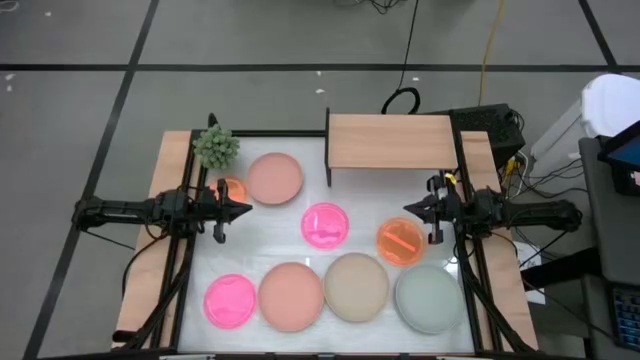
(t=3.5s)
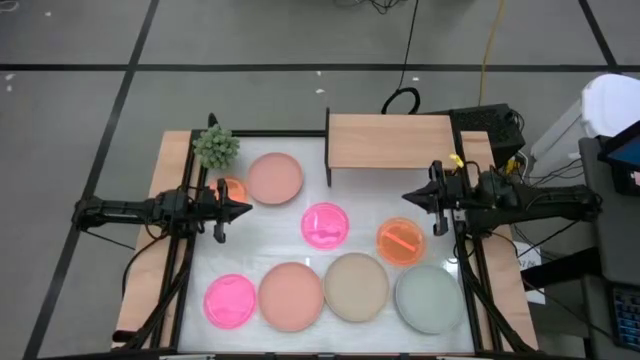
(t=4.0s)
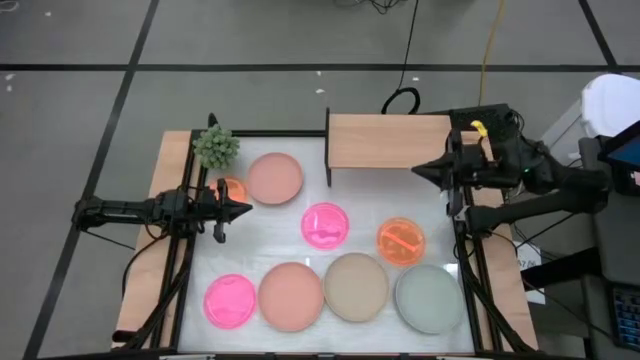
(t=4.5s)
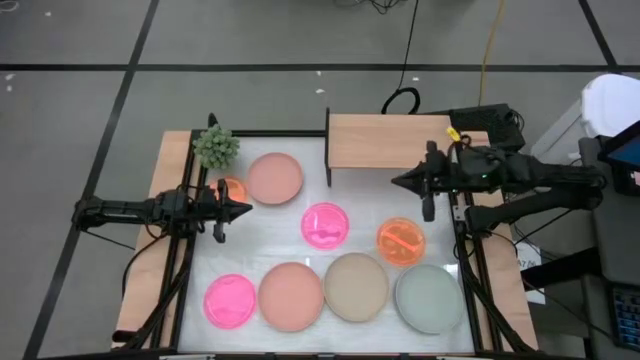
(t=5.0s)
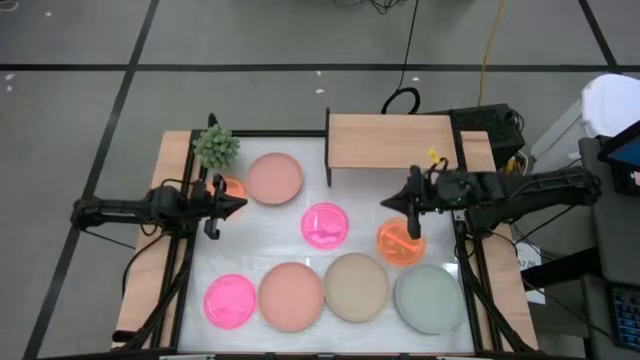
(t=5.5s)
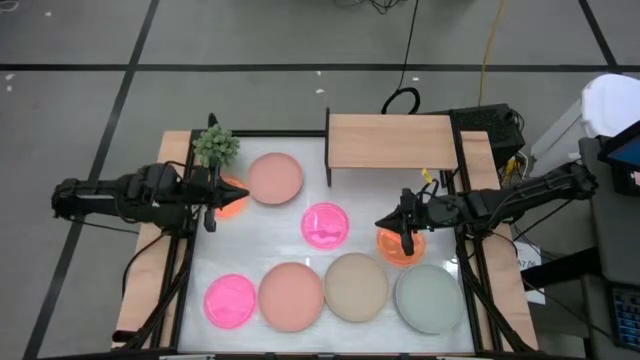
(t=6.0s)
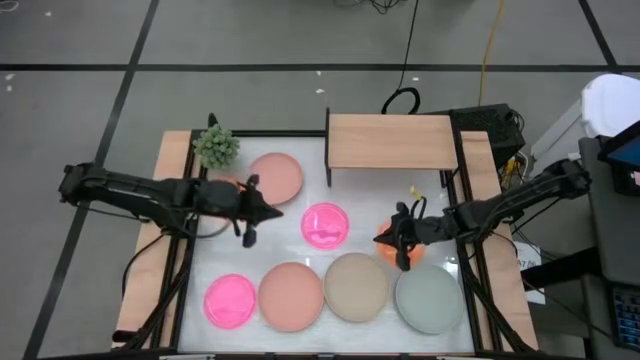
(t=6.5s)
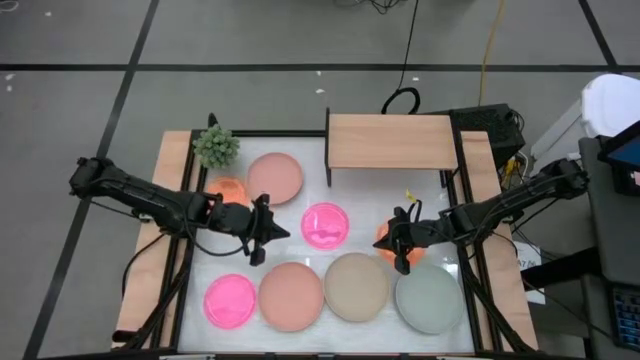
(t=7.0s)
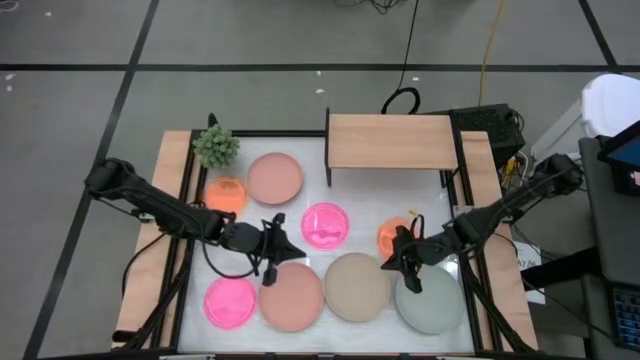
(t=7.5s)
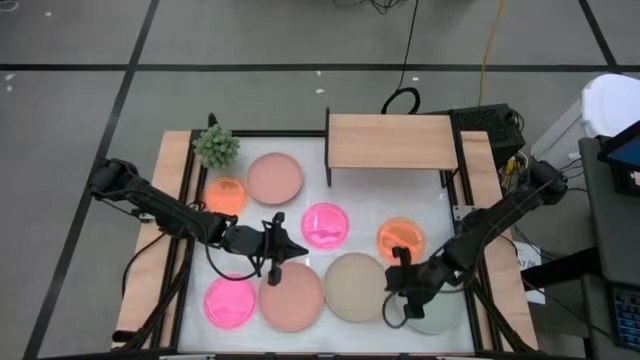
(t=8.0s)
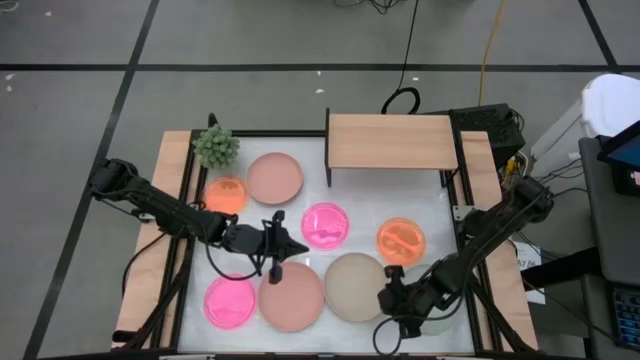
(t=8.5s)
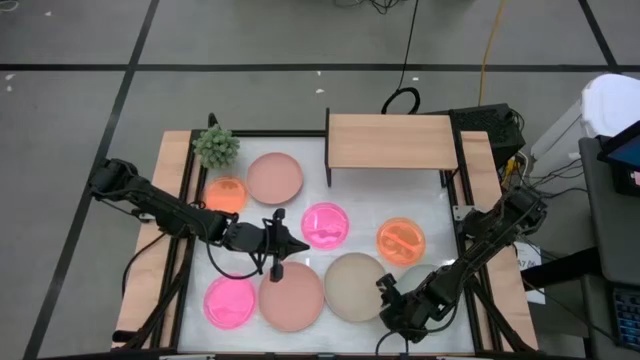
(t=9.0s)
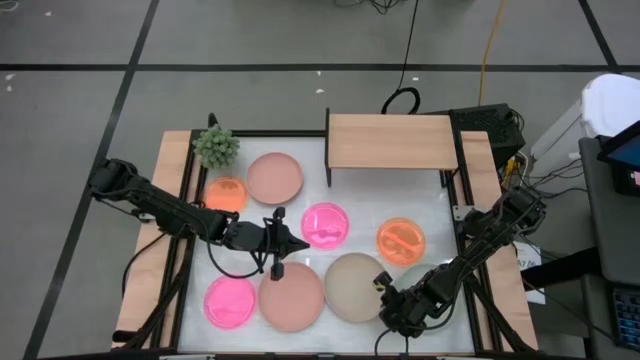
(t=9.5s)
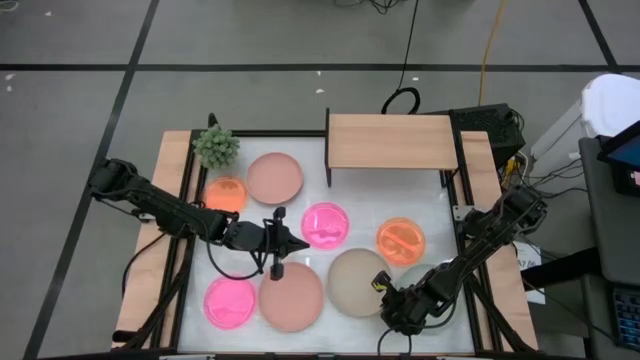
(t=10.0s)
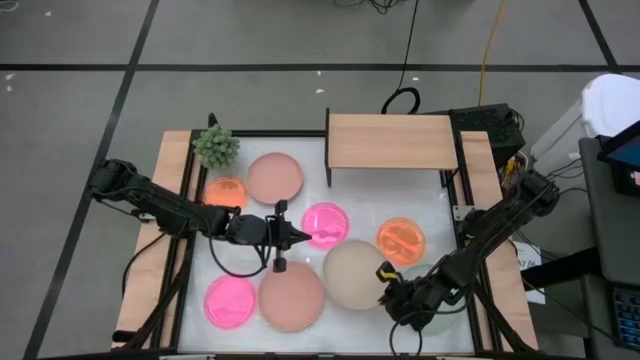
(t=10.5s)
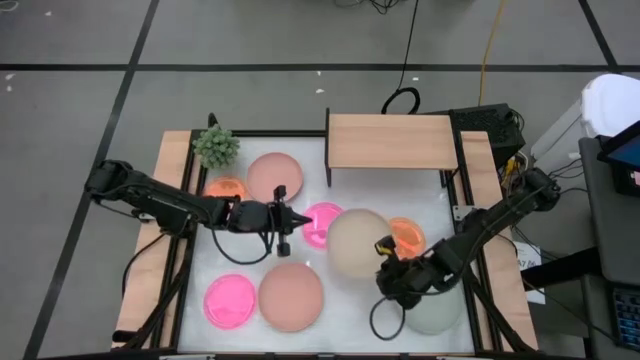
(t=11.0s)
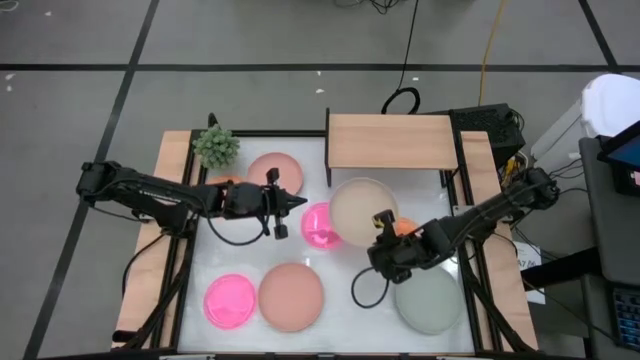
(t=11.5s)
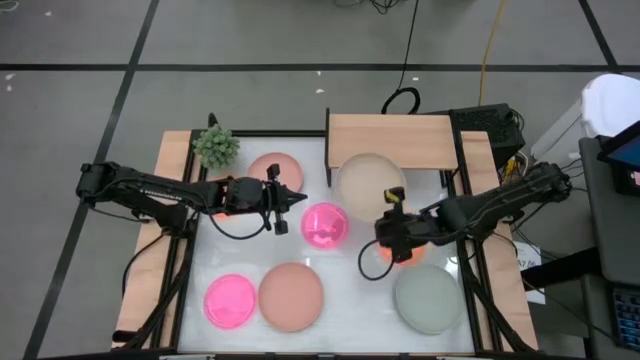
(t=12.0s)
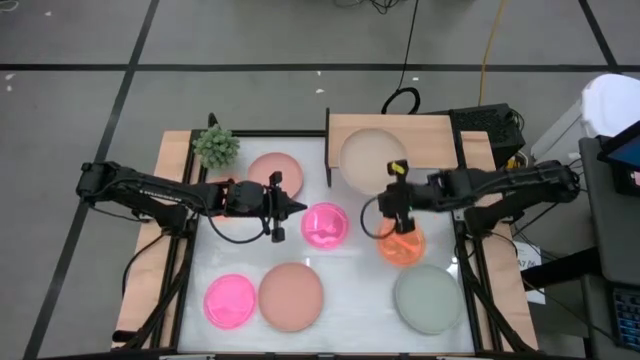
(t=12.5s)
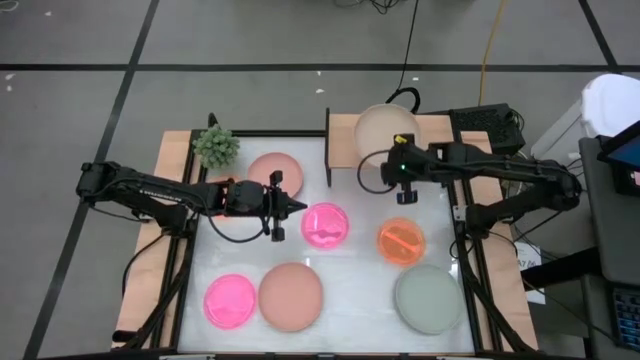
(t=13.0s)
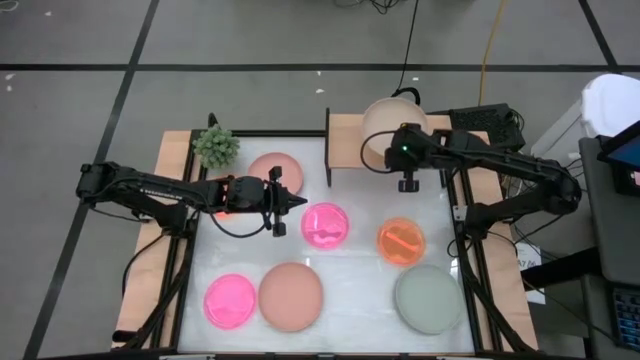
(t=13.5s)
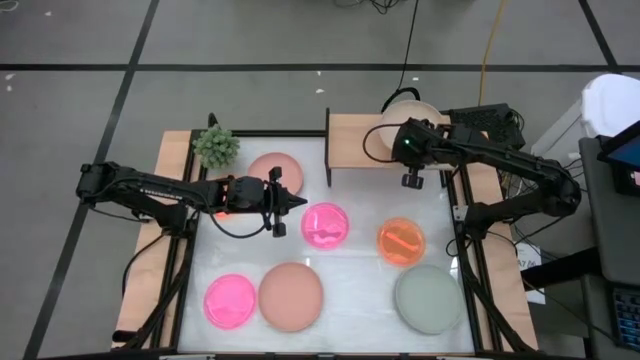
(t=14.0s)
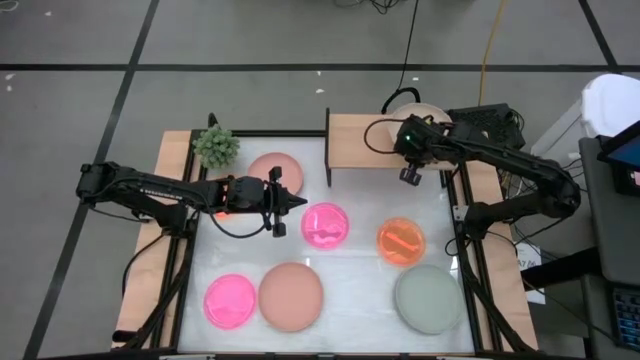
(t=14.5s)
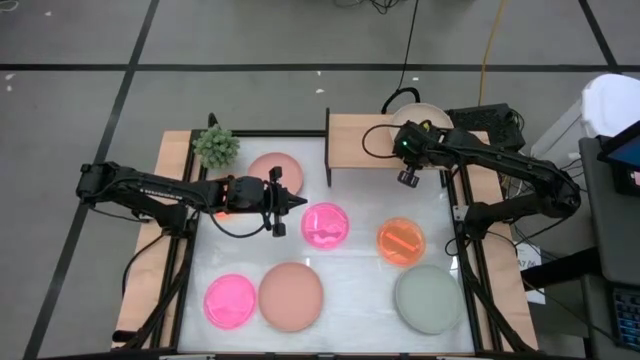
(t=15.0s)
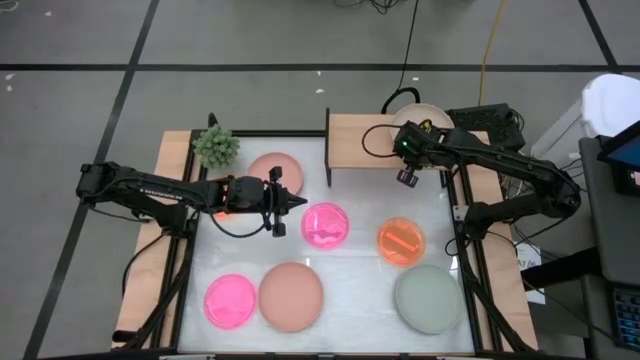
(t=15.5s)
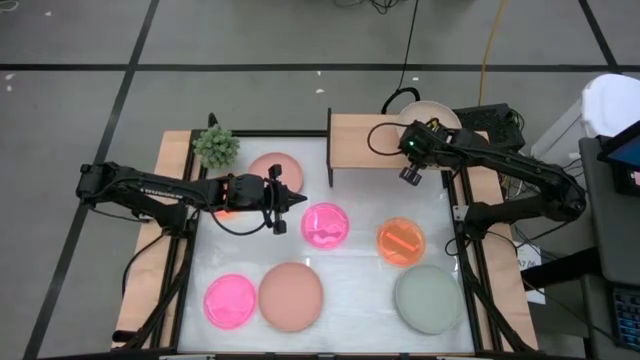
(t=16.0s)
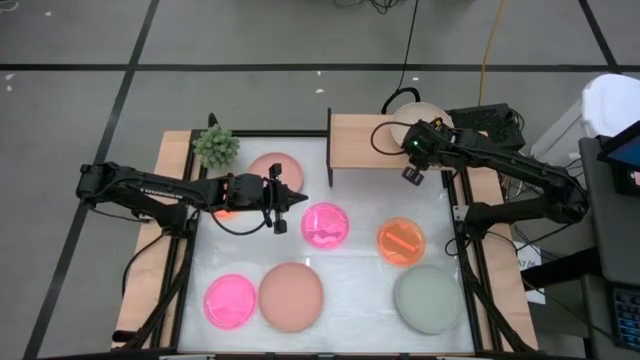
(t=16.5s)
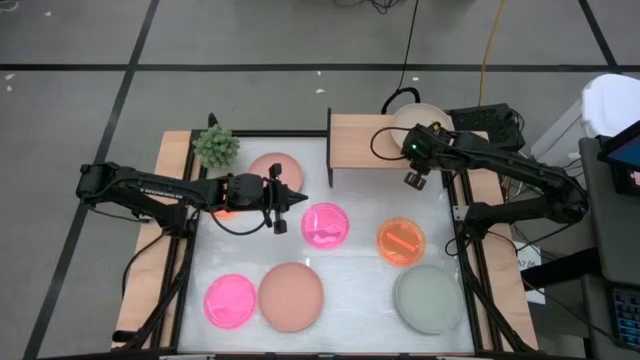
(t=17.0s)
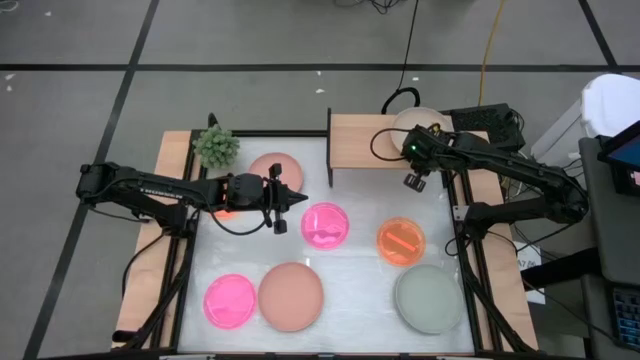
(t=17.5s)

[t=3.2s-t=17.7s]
Task: Place and stack plates onto a shelf
Put the brown plate on the shelf

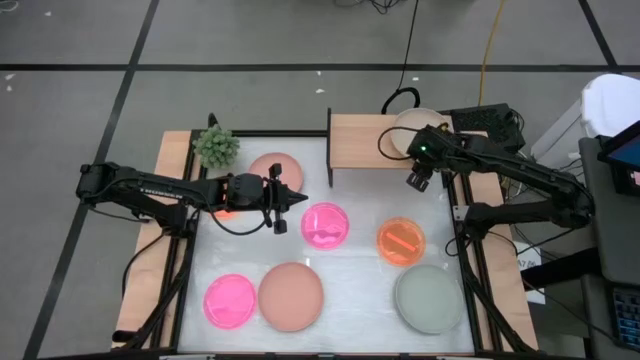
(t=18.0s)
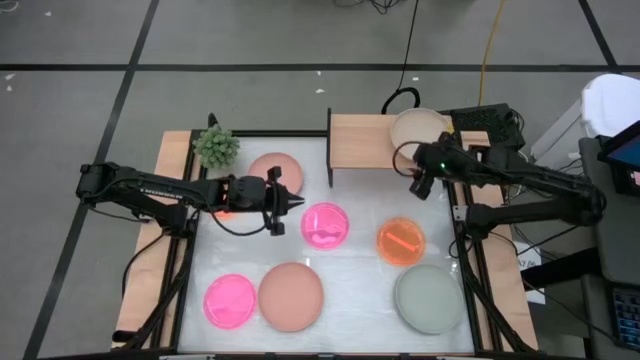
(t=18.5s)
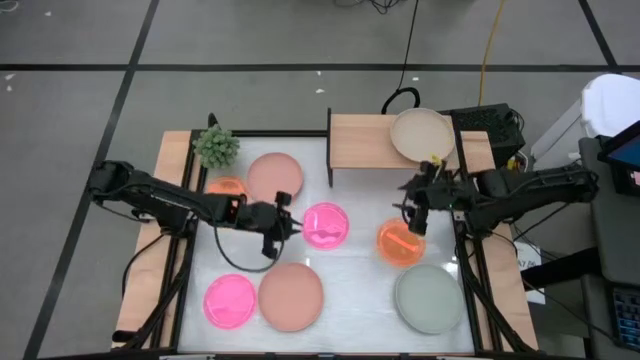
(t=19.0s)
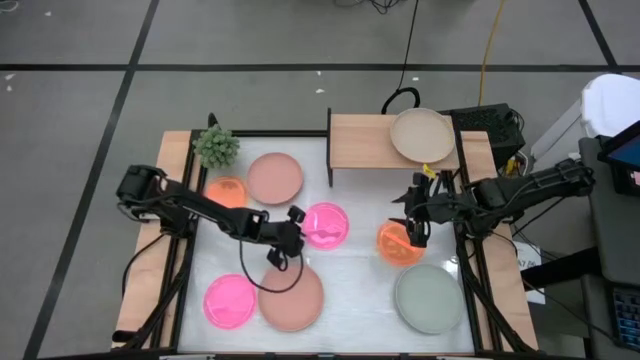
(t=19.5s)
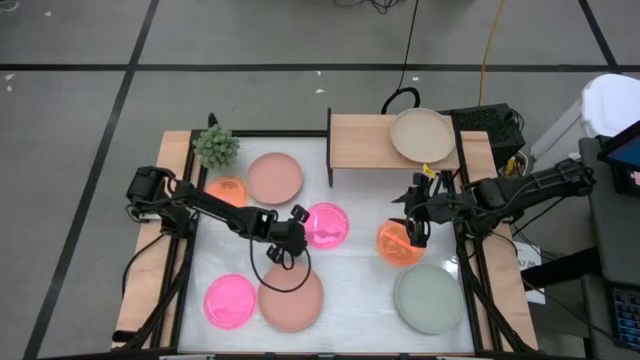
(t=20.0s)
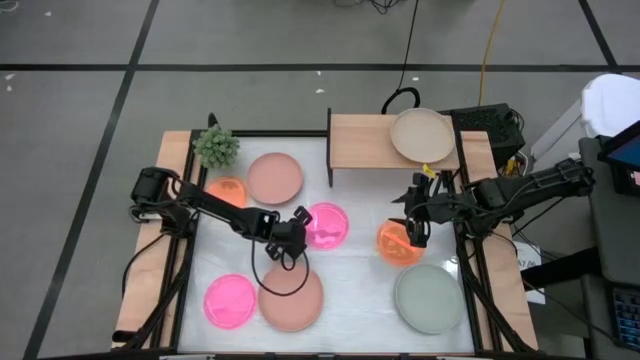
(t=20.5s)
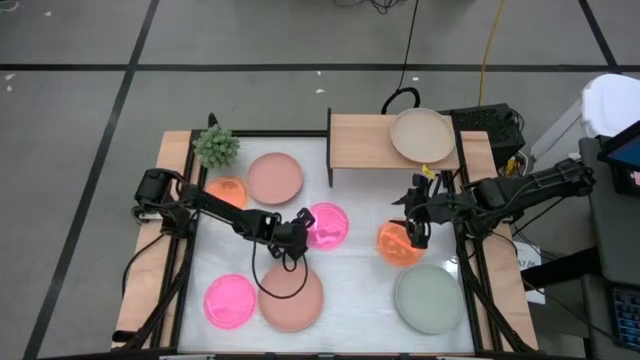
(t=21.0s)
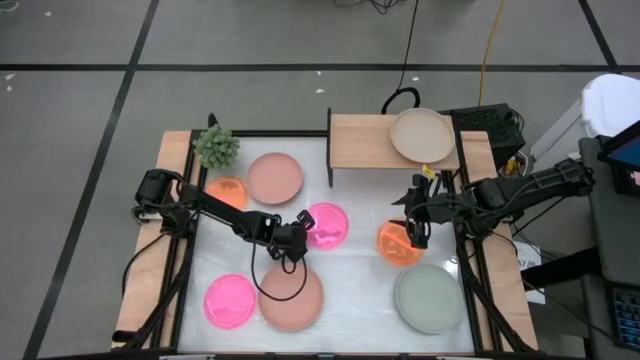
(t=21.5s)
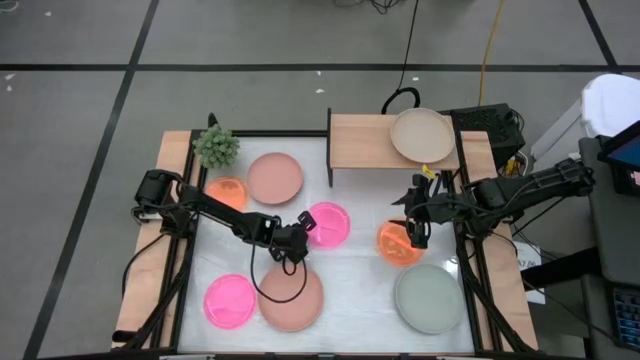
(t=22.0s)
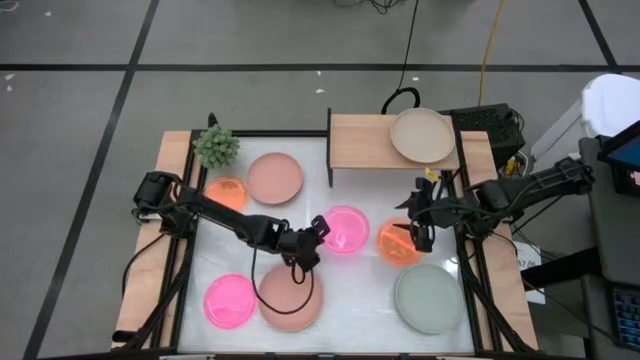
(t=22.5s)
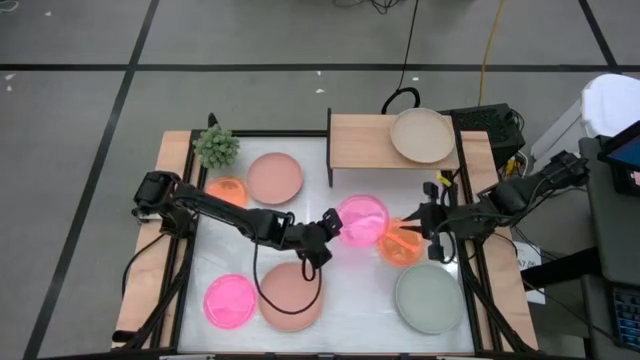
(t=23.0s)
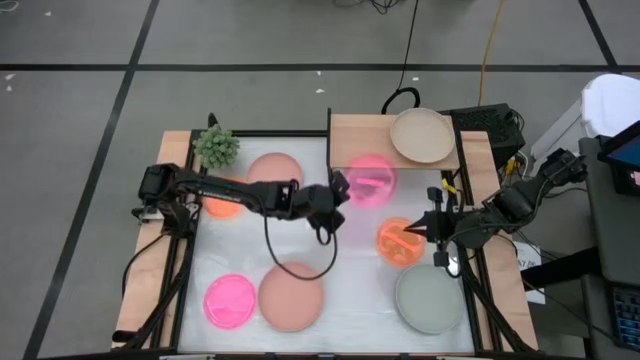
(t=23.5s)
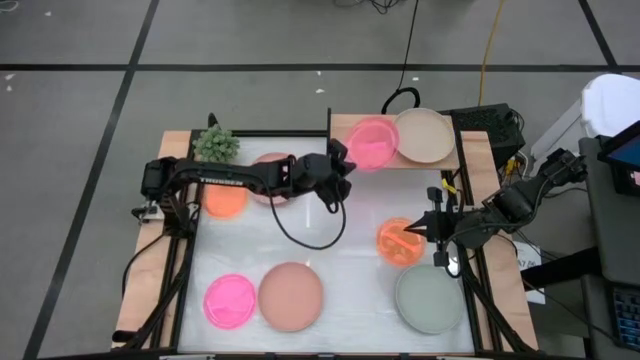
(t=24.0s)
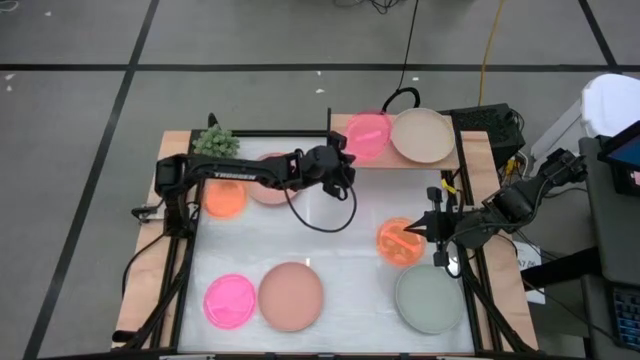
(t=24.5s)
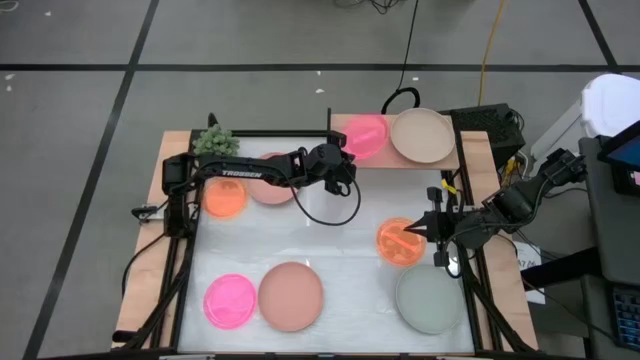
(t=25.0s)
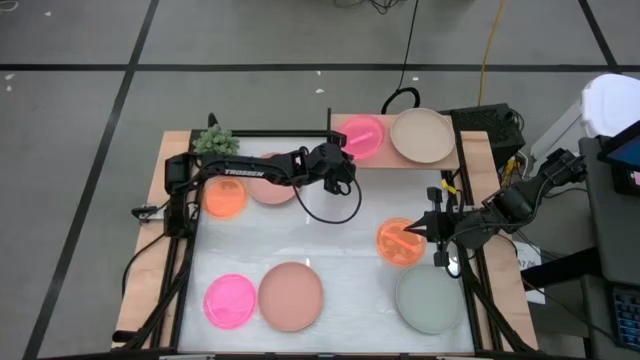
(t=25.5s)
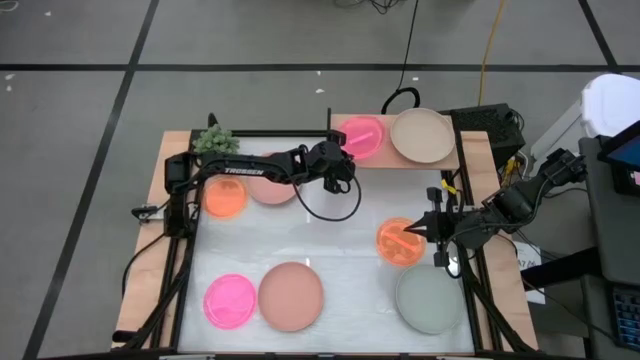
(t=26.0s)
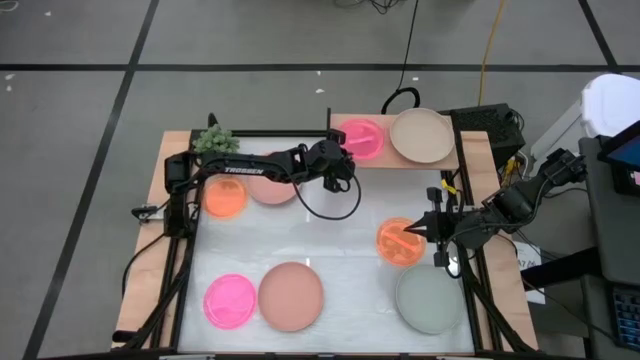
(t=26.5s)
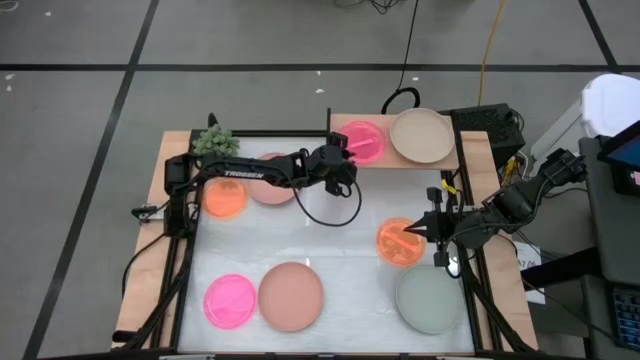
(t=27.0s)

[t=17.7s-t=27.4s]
Put the top light pink plate on the shelf
